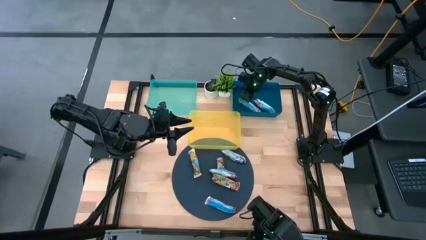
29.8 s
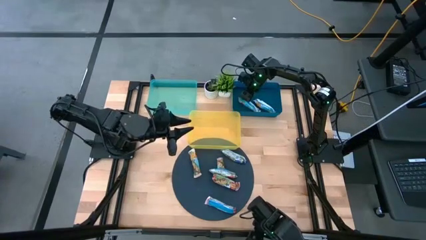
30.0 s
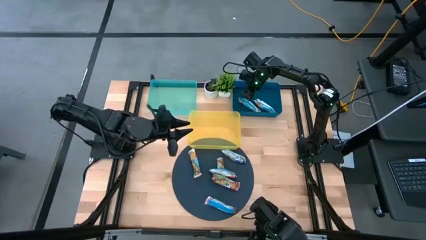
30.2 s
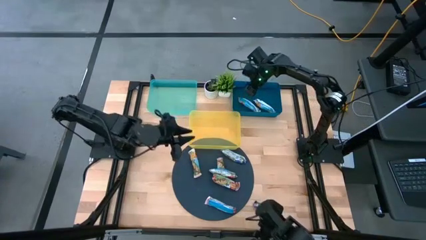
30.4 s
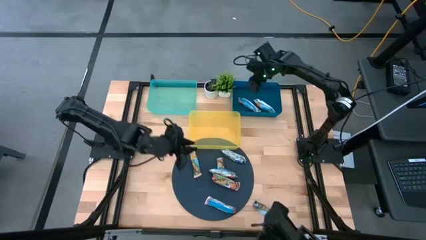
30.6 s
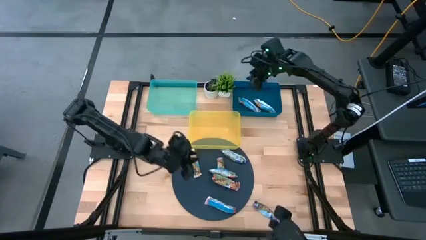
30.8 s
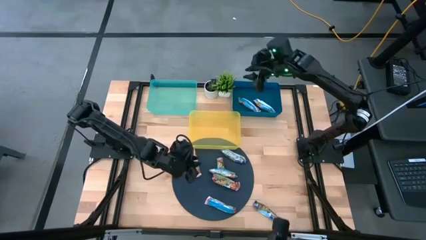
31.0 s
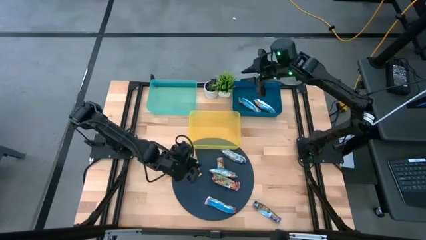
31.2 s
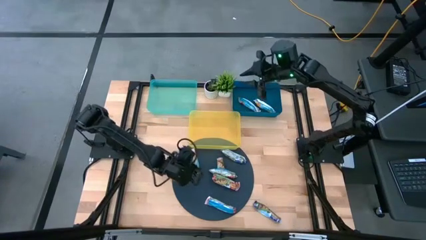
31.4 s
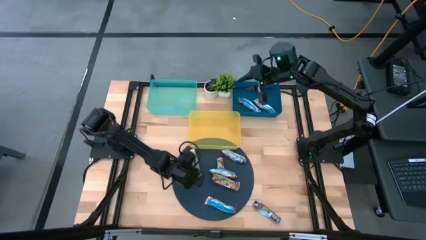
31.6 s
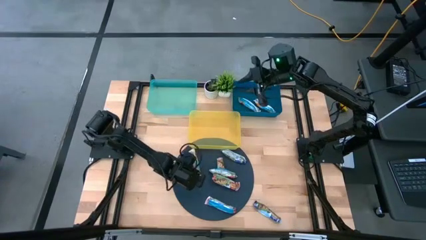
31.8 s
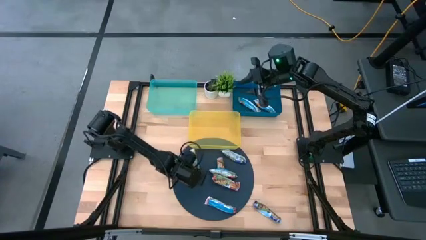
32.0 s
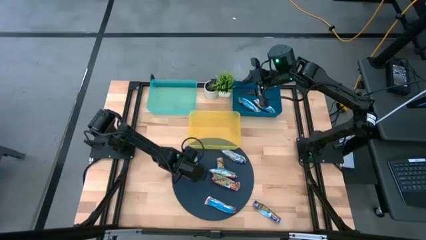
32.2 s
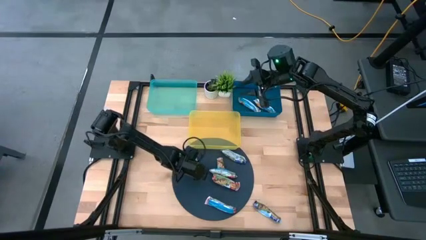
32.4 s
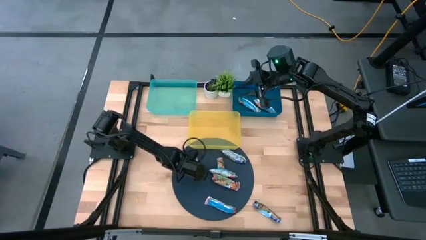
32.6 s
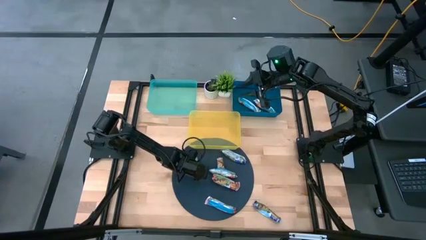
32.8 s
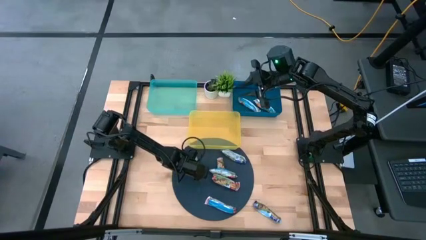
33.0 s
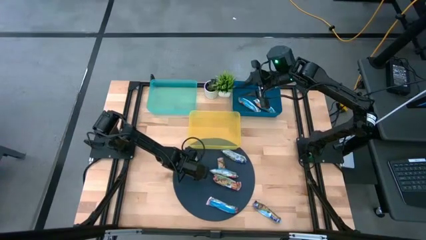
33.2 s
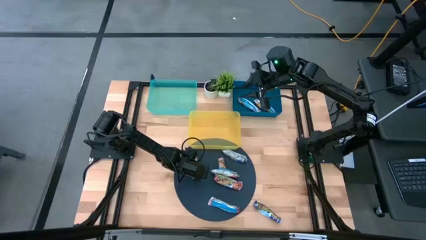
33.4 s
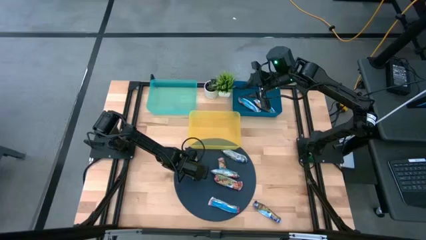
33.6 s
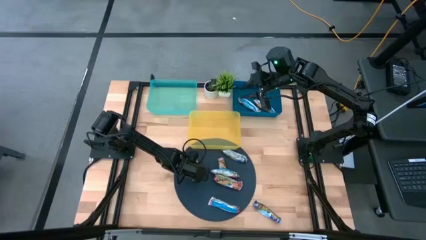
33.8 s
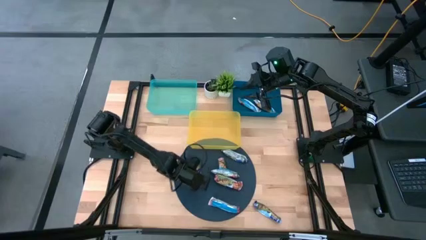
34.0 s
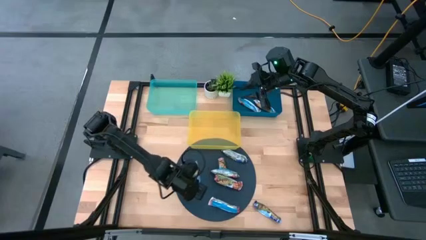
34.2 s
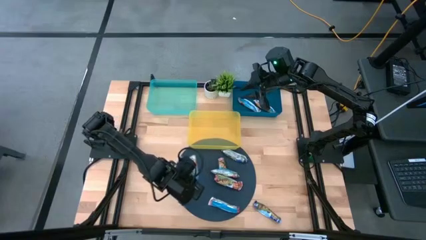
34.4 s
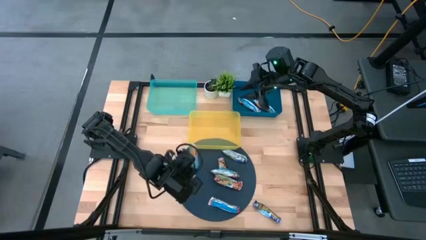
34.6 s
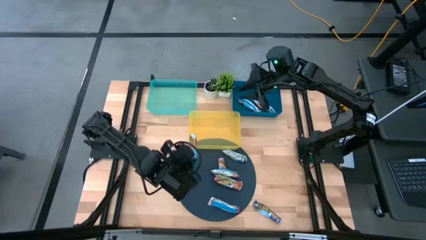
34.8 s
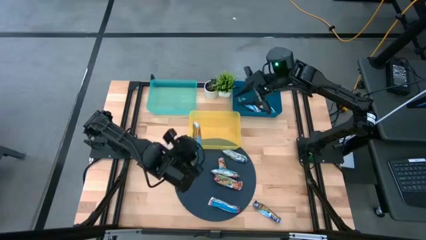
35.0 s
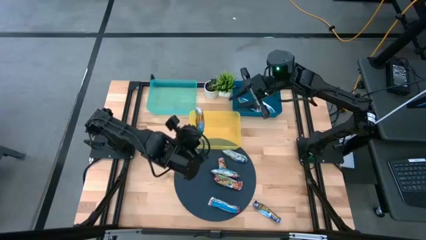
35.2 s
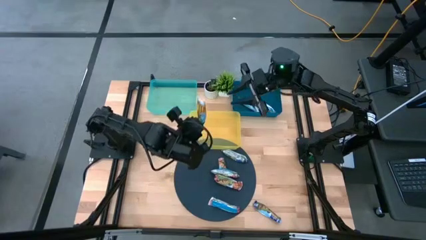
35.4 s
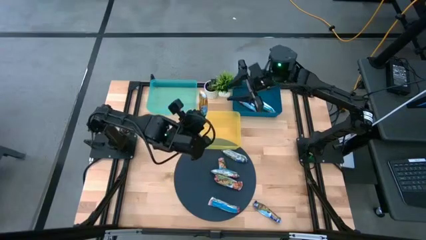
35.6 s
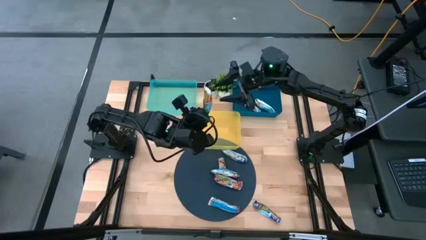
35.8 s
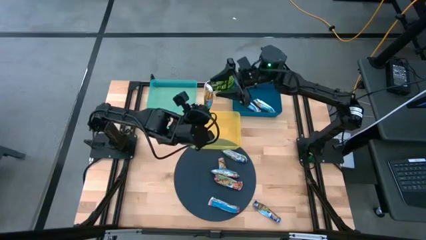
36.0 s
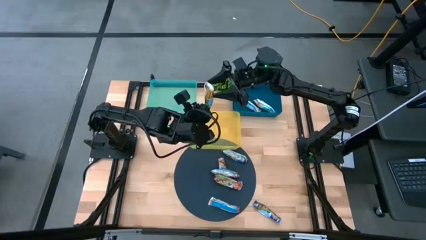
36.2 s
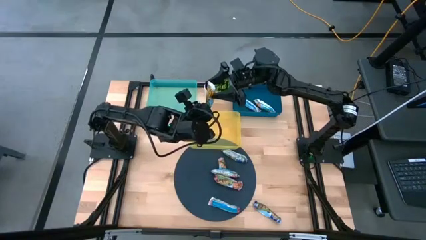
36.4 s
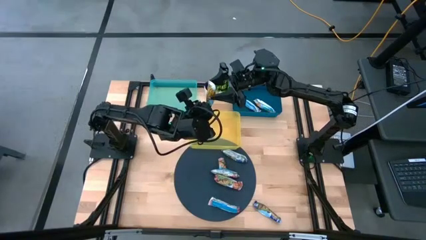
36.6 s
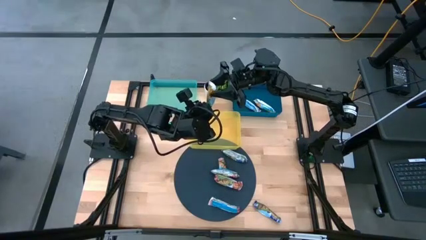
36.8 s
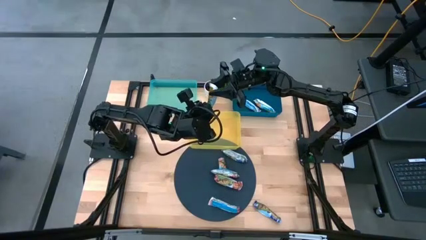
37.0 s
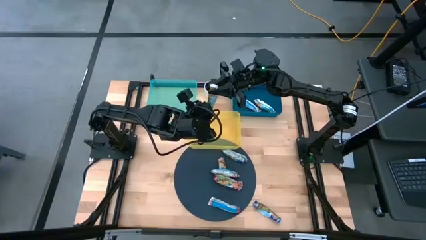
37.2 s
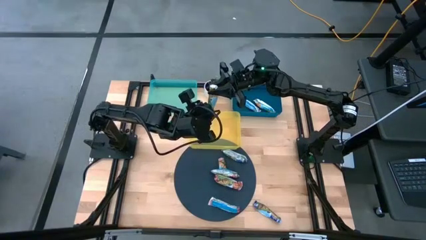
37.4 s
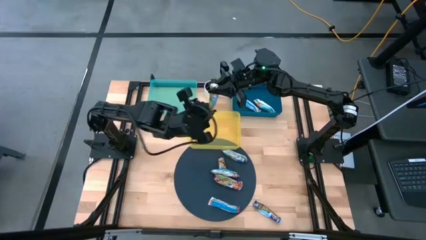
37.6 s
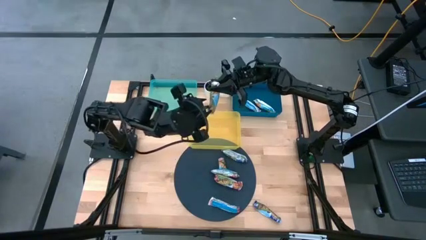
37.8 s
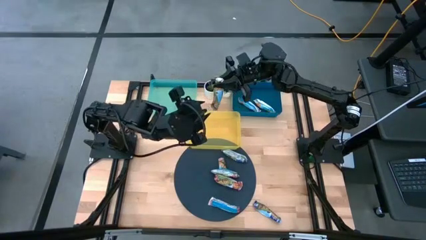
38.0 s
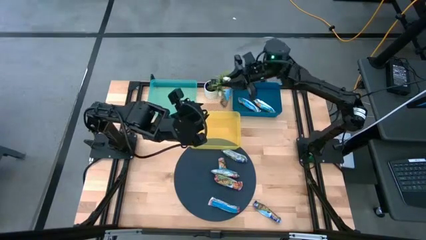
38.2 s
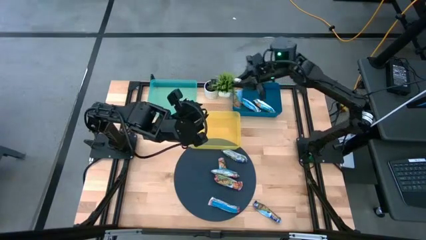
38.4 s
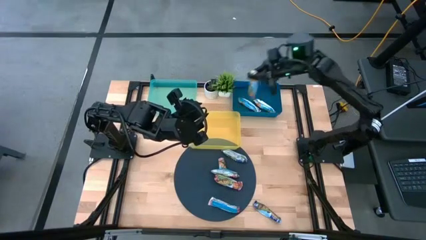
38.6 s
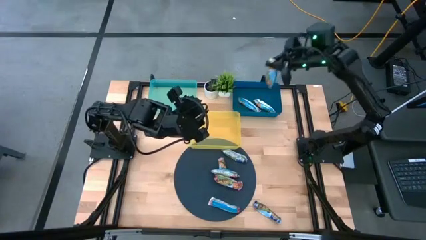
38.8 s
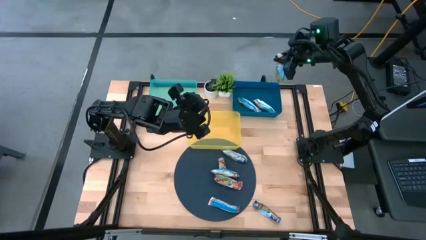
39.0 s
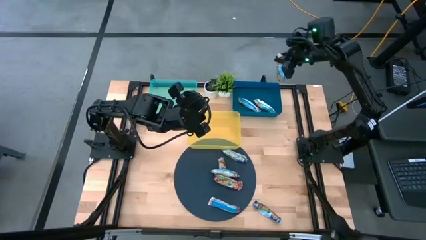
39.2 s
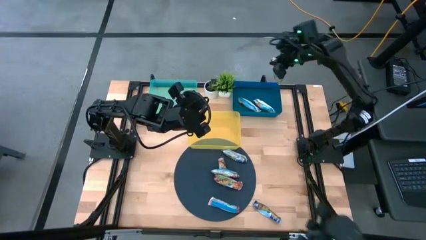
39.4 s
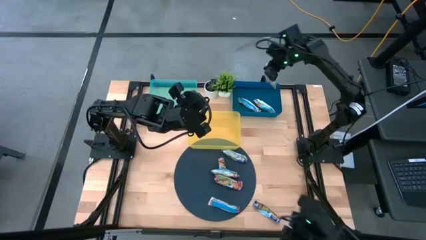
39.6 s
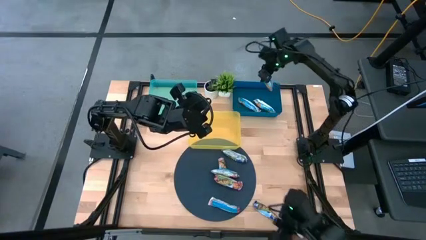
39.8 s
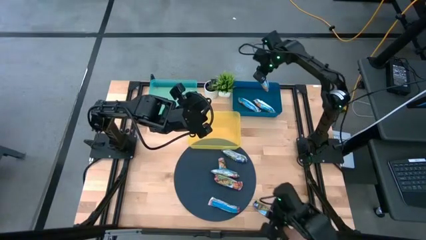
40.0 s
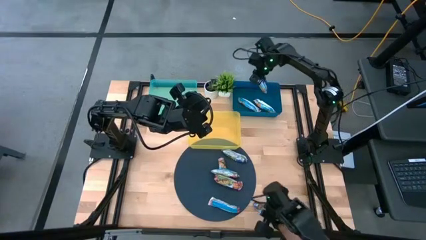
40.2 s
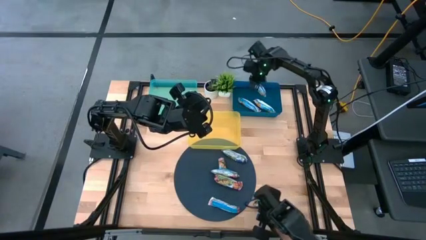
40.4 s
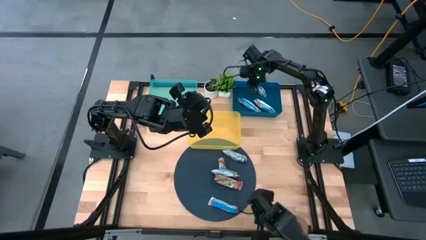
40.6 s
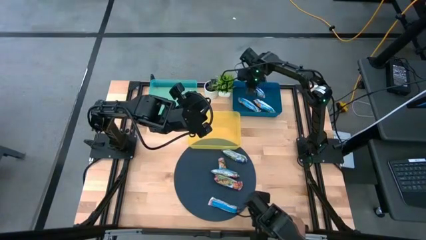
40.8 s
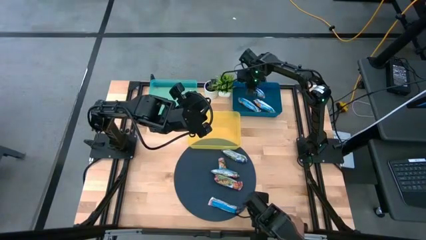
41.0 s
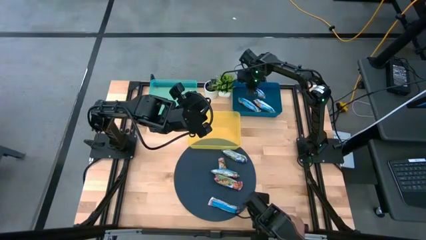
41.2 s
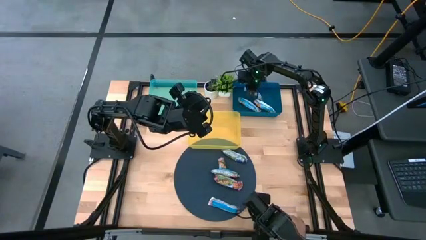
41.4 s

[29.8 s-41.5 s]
Task: Pick and place Granola Bars by type
Put the yellow granola bar into the blue bin
